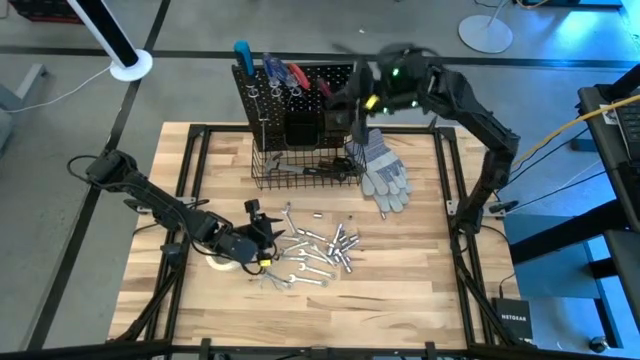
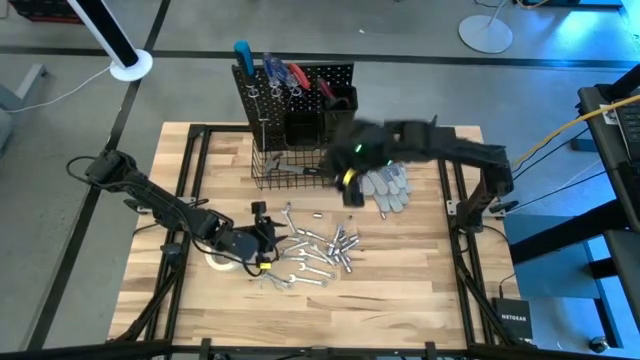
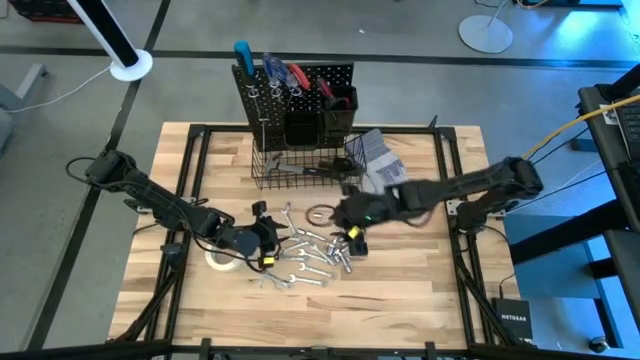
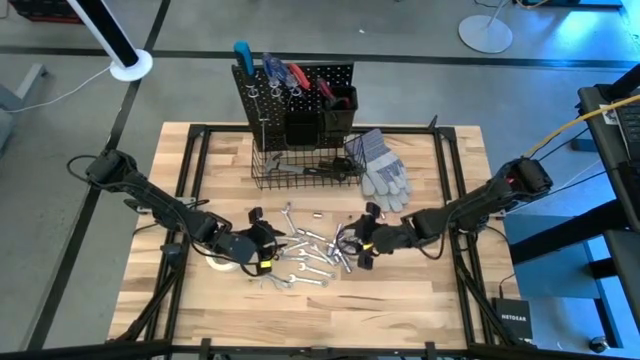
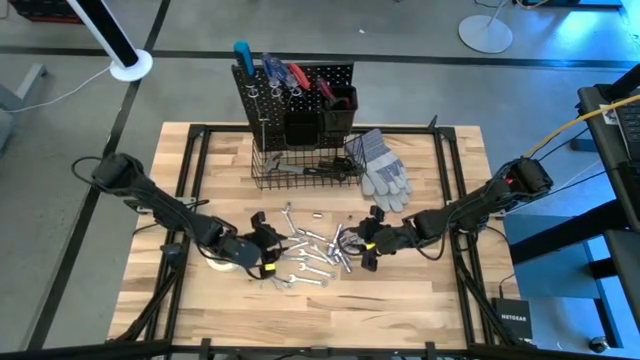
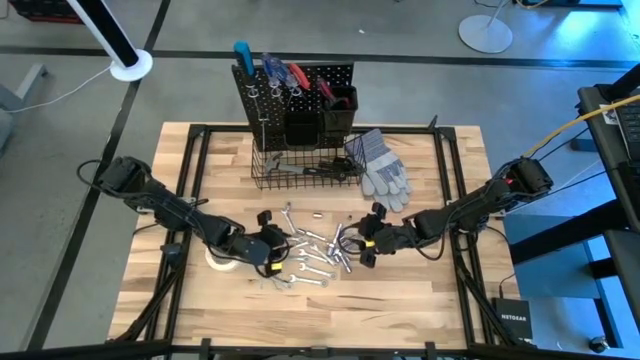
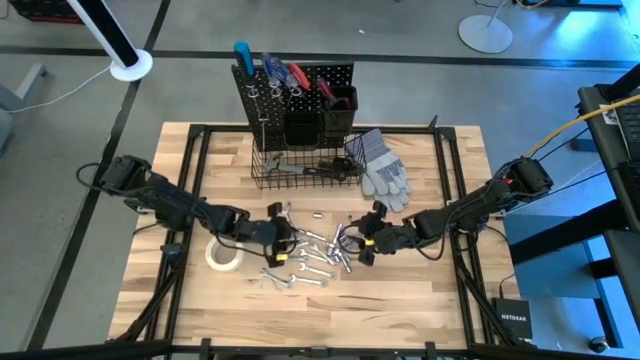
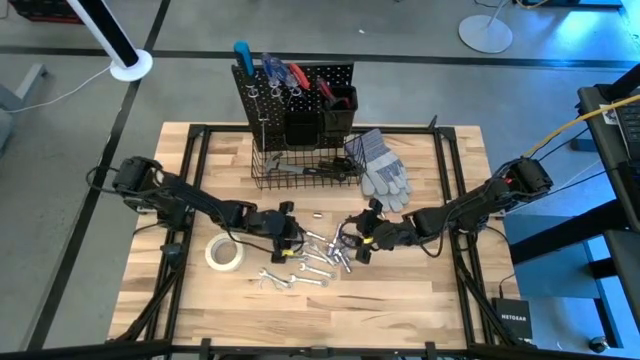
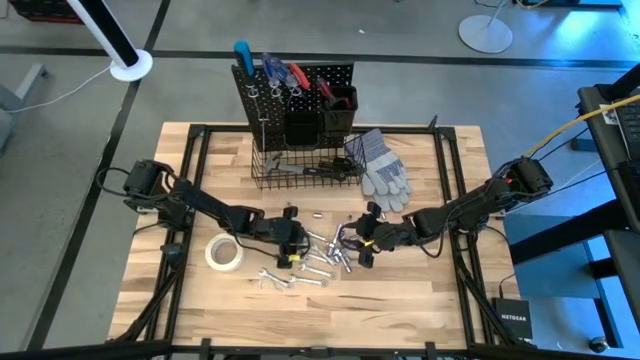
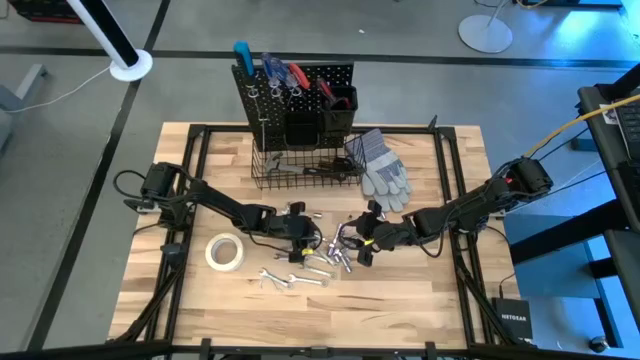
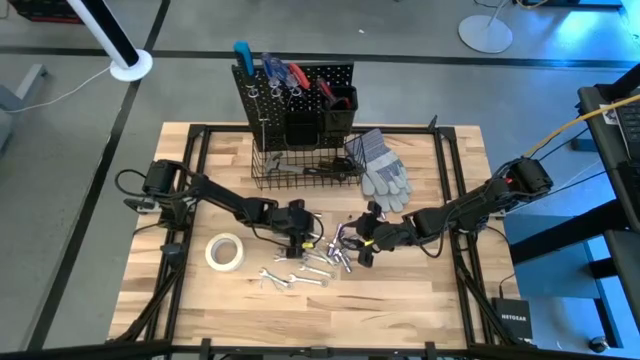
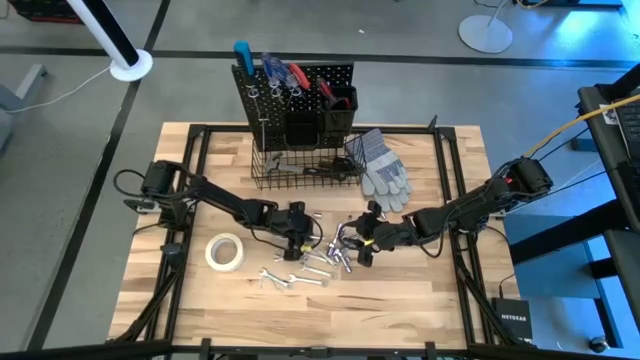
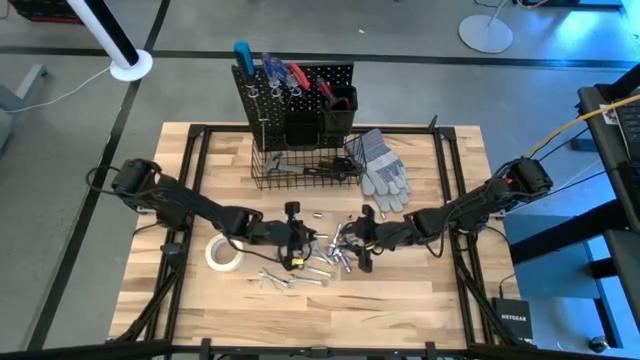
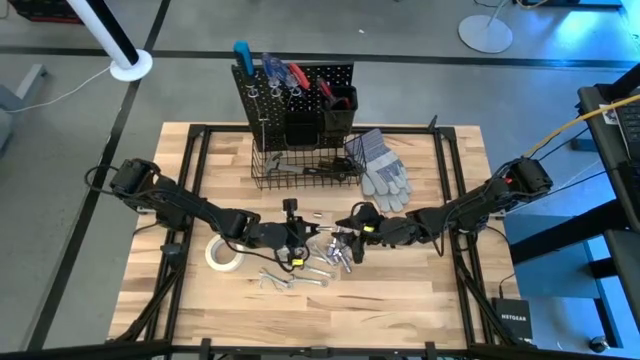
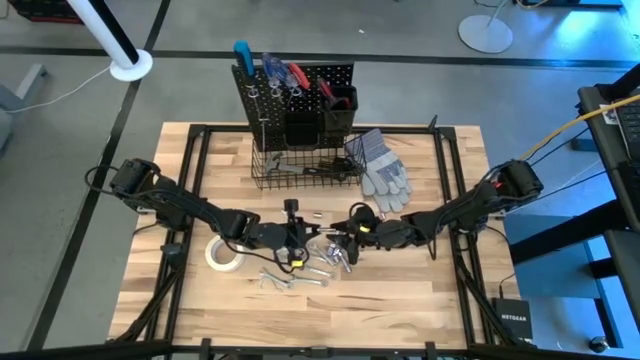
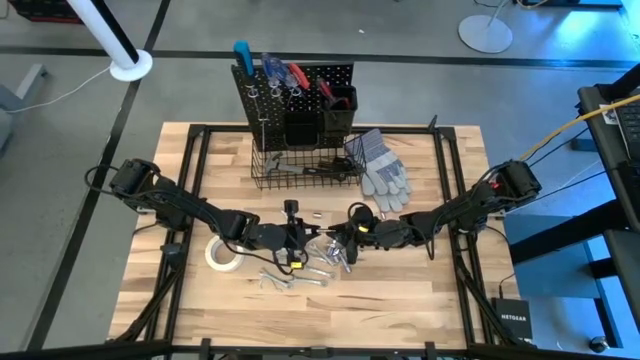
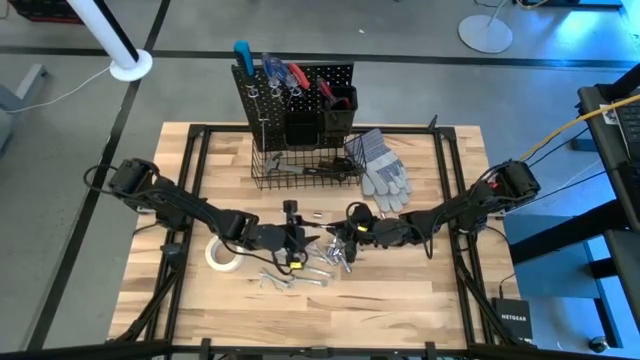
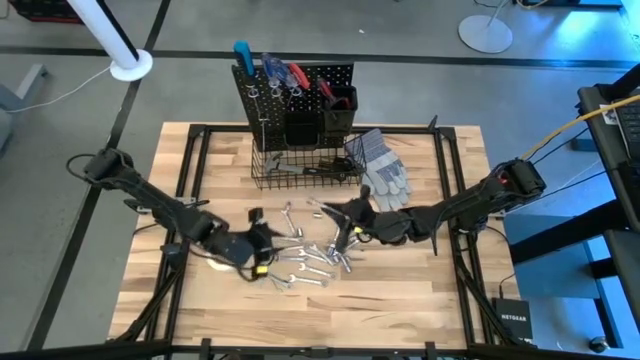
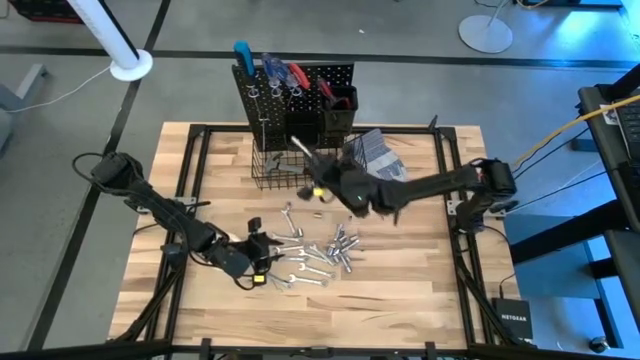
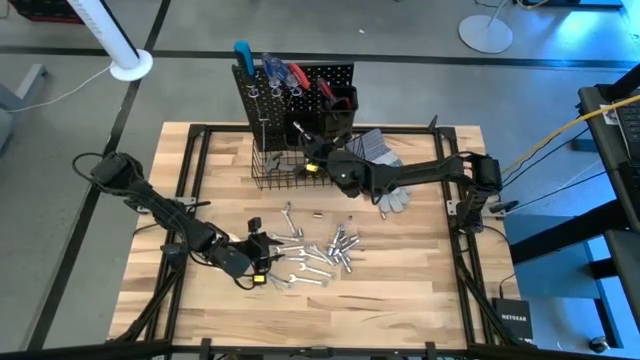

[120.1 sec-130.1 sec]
Task: Hang tools onto peg board
Put the extension bar into the left black bin on the peg board

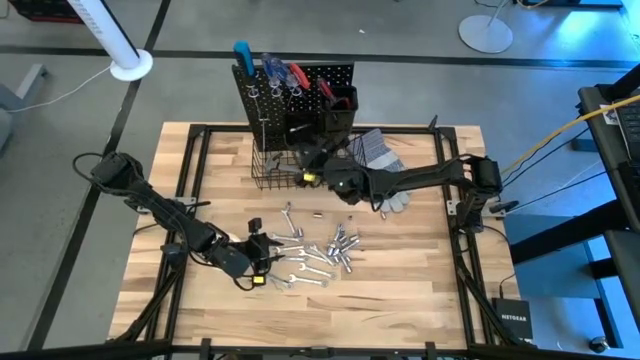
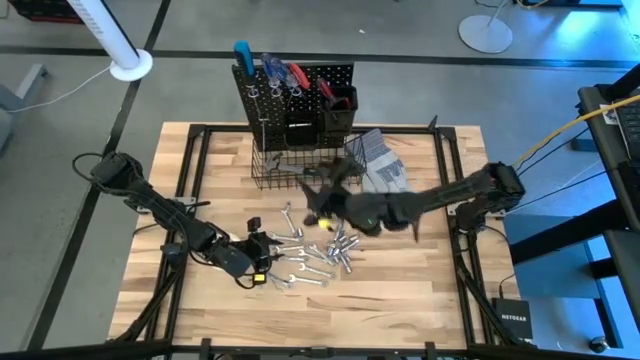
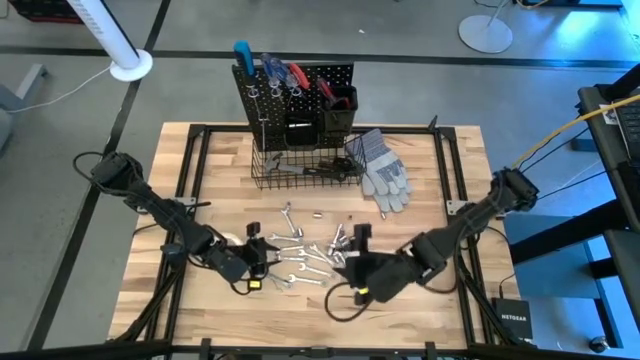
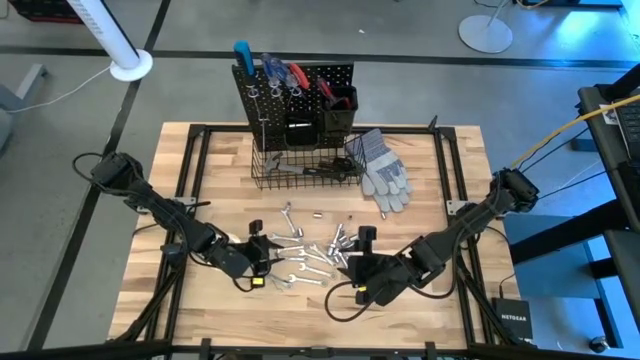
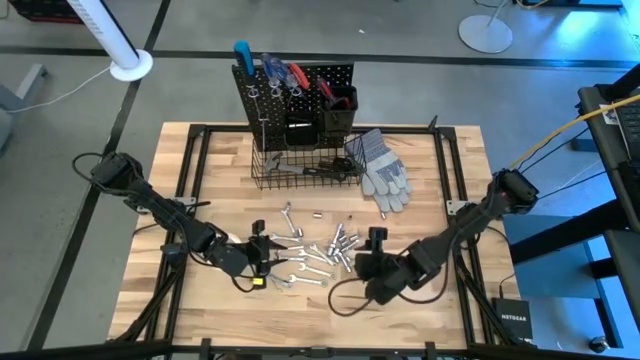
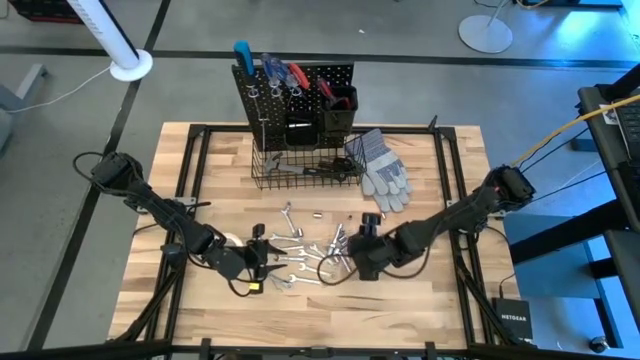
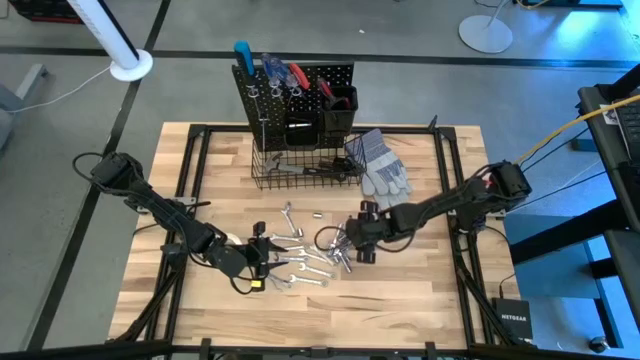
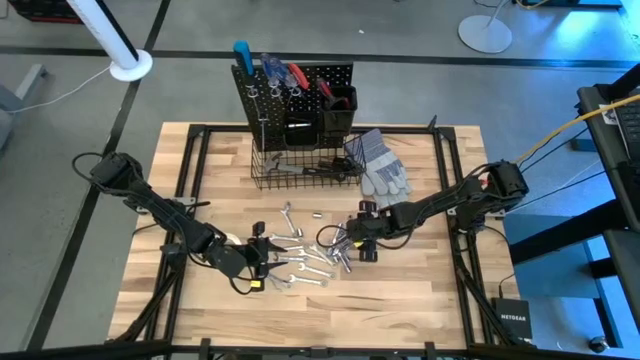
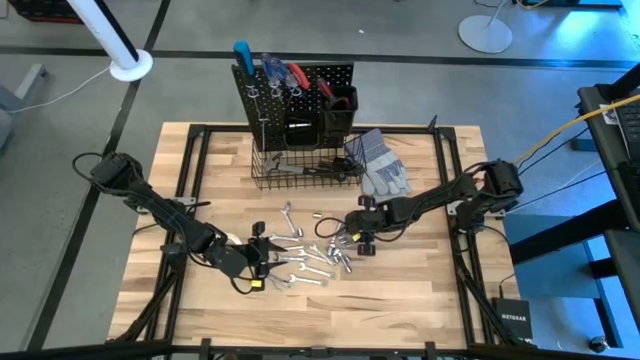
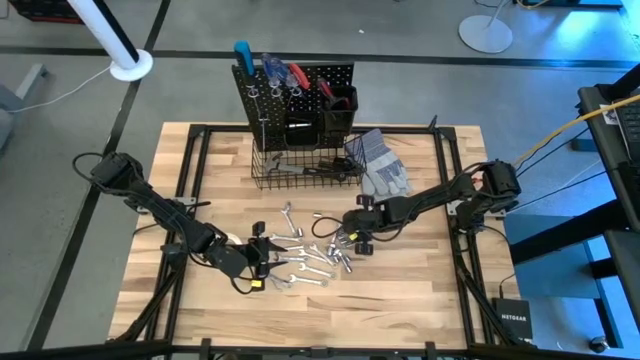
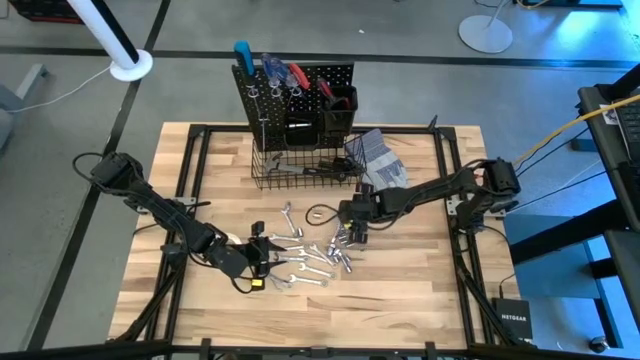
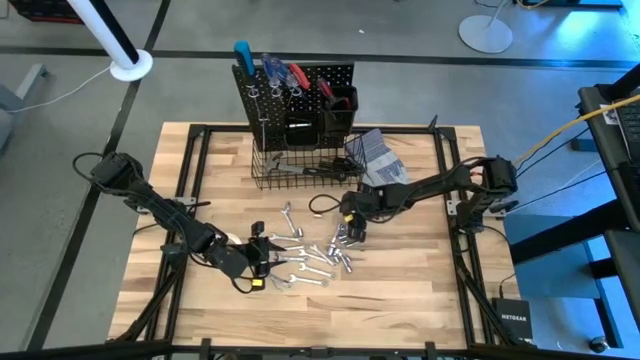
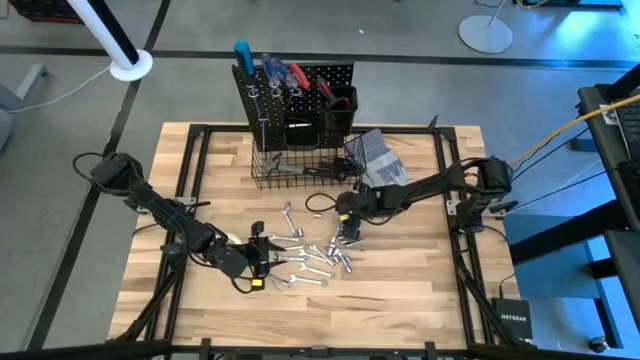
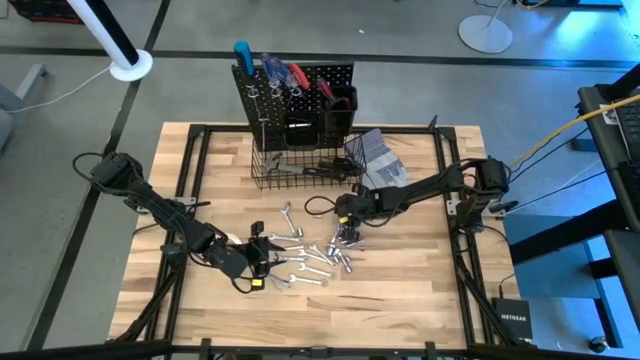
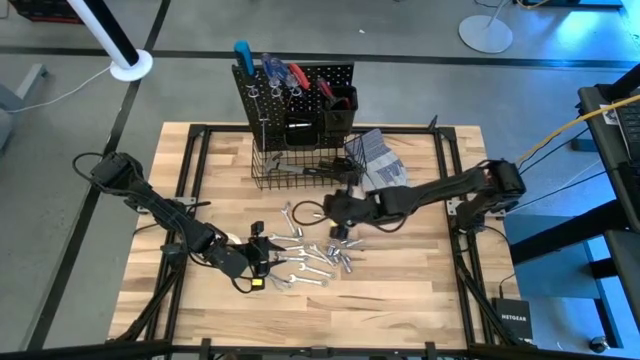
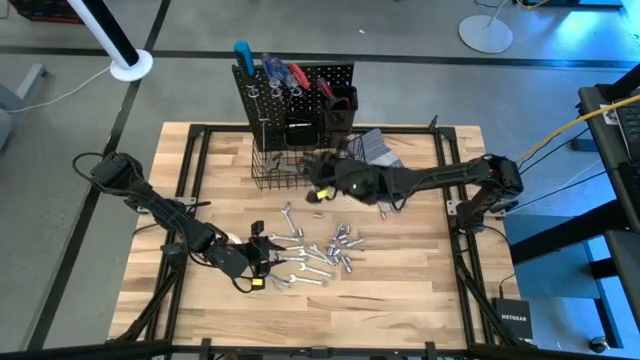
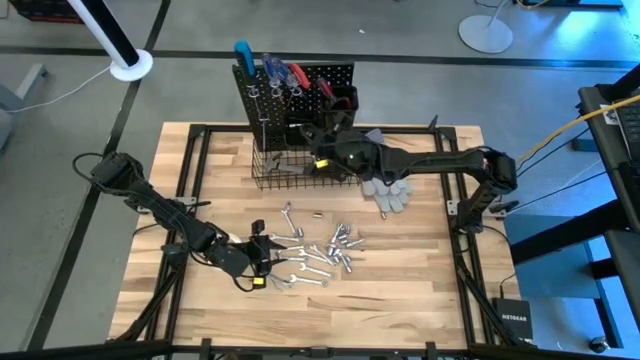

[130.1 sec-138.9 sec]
Put the socket into the left black bin on the peg board

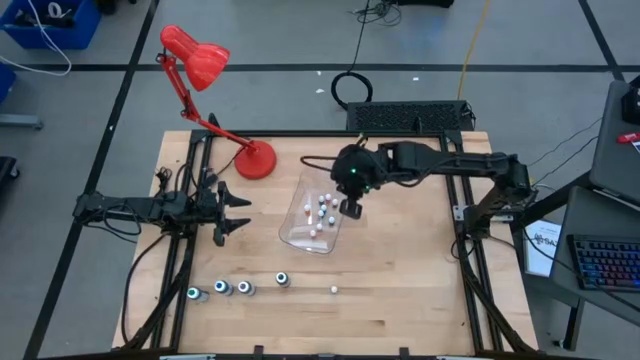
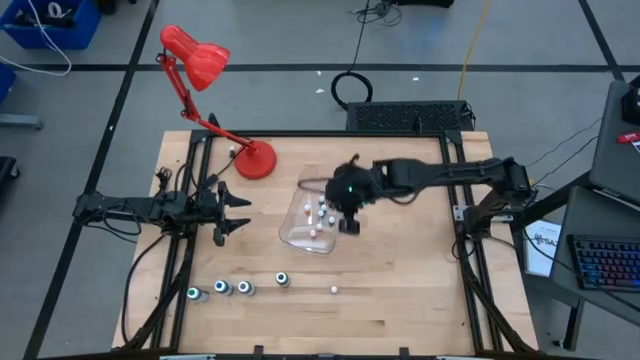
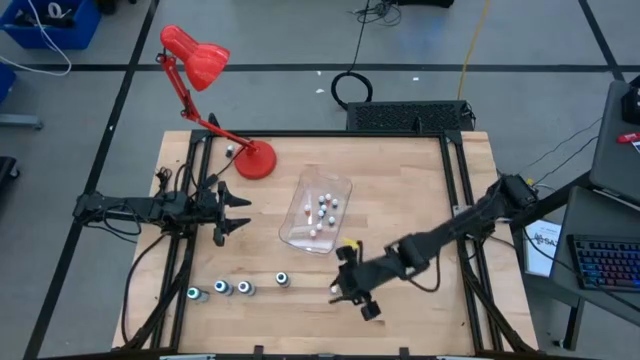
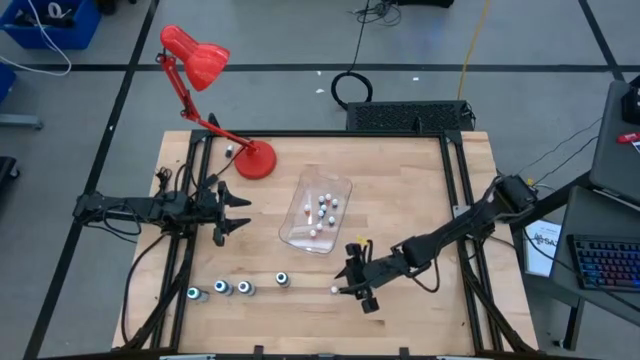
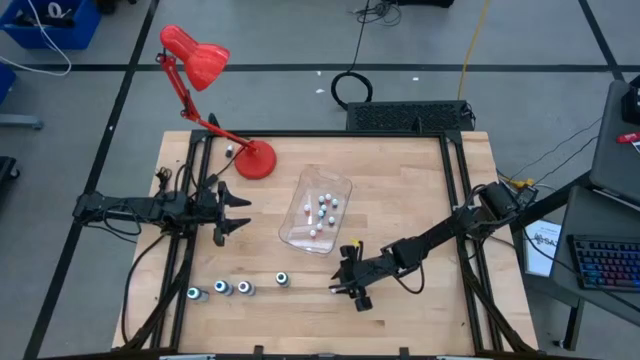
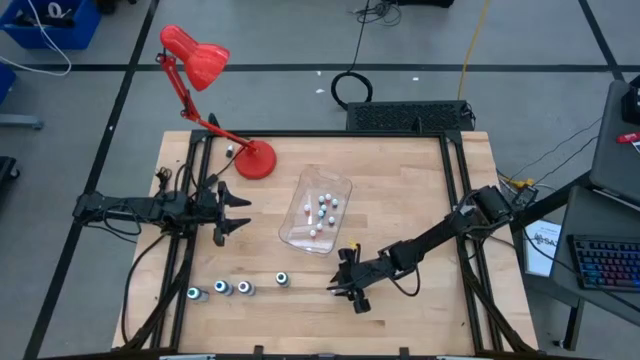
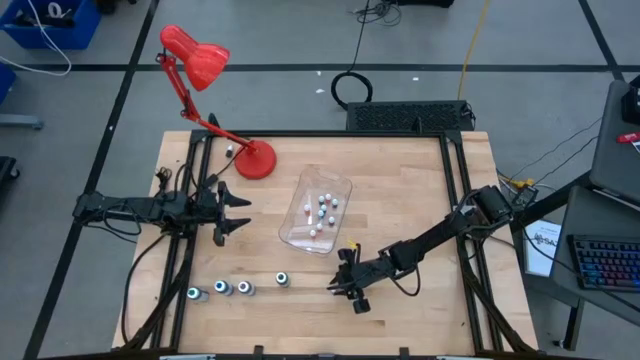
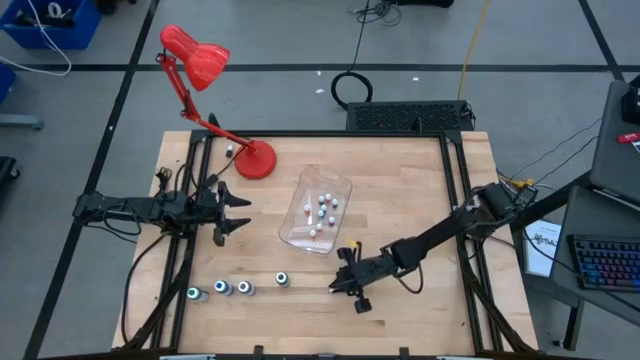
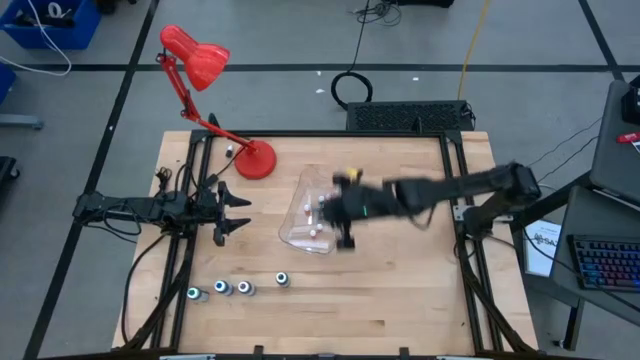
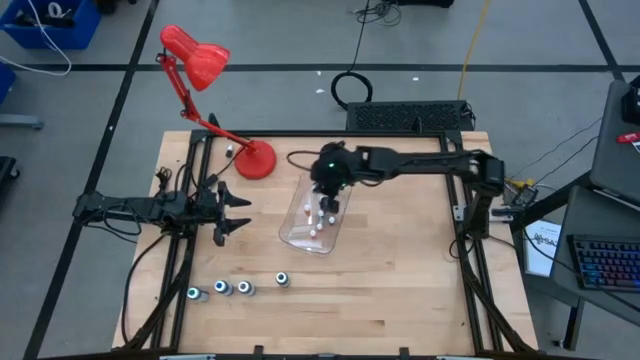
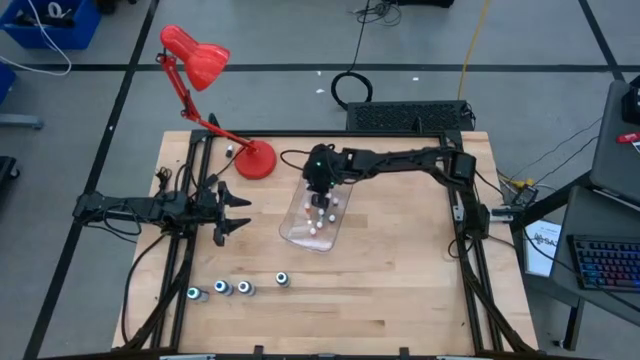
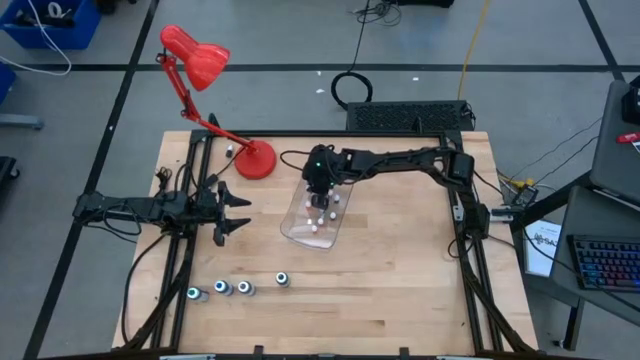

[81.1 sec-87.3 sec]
Task: Pick & Place food coloring
Put the small purple food coloring bottle into the transparent bin
